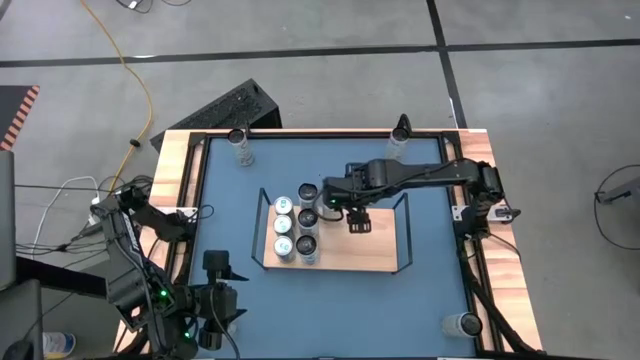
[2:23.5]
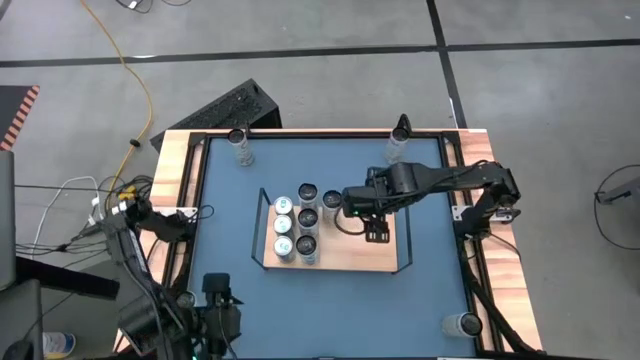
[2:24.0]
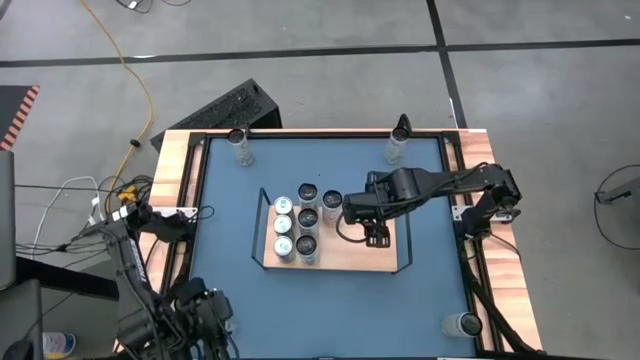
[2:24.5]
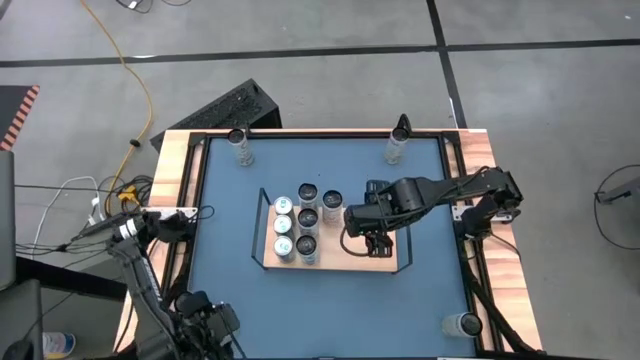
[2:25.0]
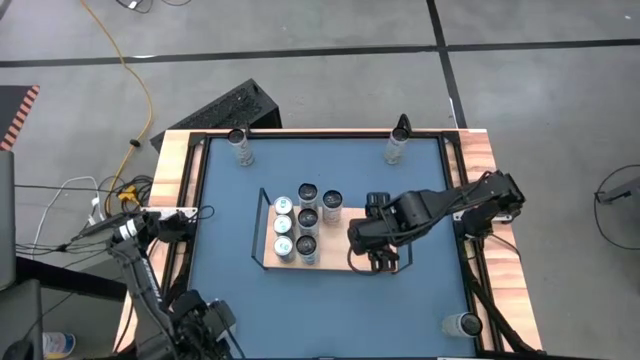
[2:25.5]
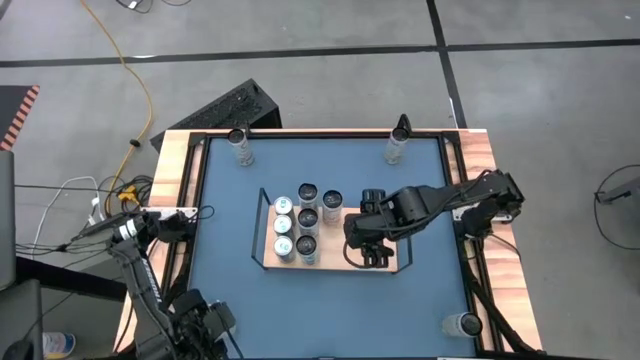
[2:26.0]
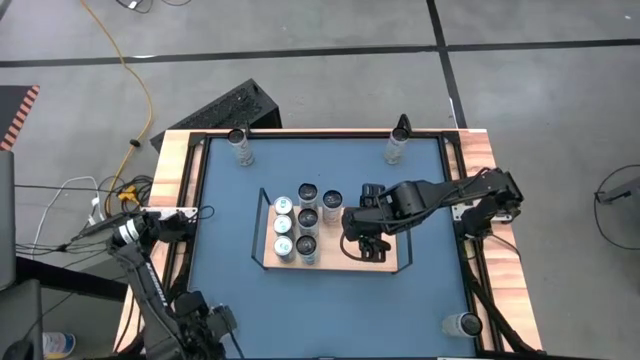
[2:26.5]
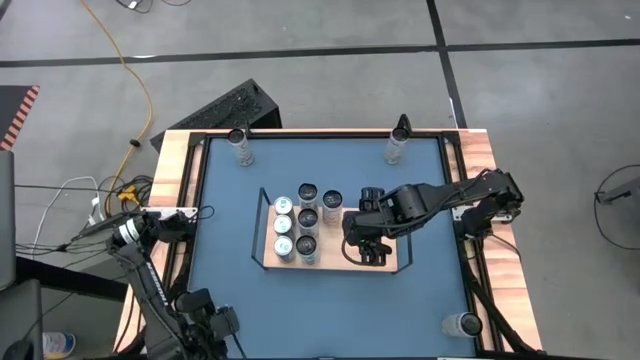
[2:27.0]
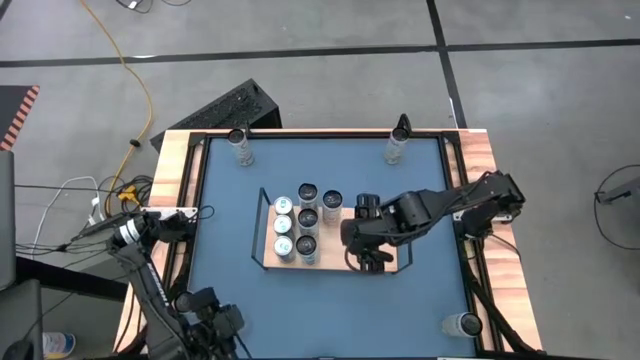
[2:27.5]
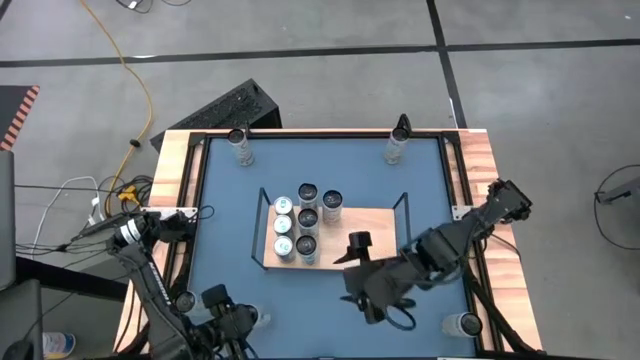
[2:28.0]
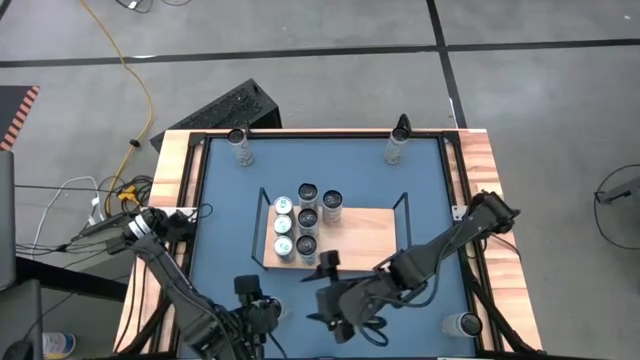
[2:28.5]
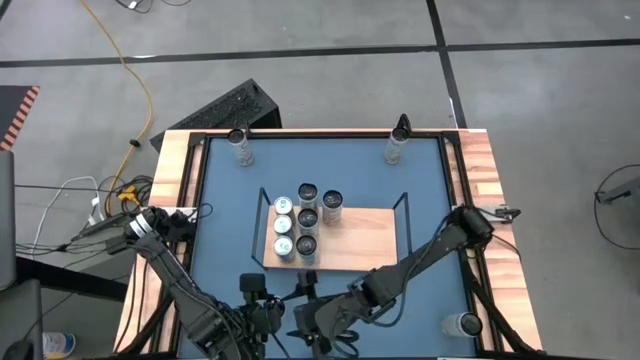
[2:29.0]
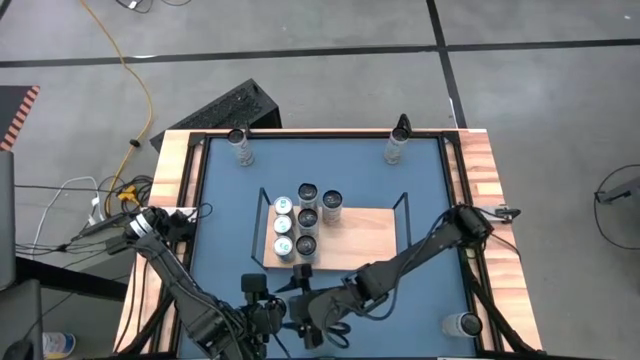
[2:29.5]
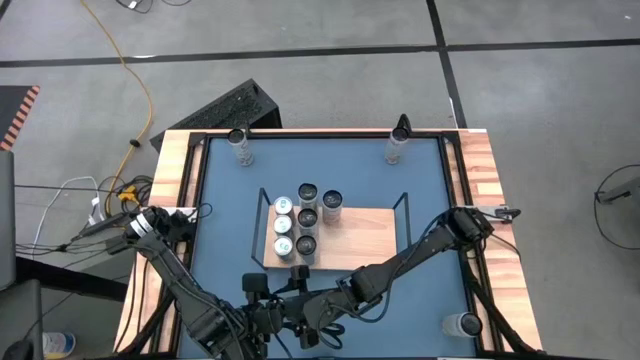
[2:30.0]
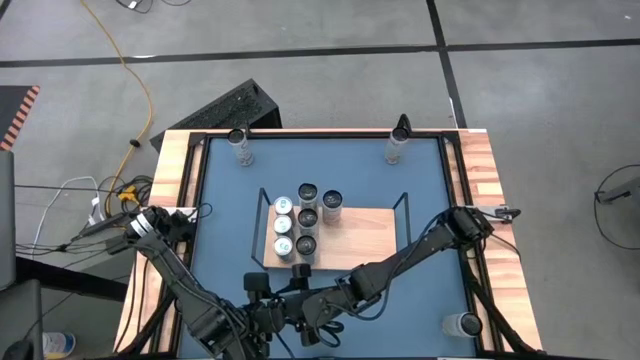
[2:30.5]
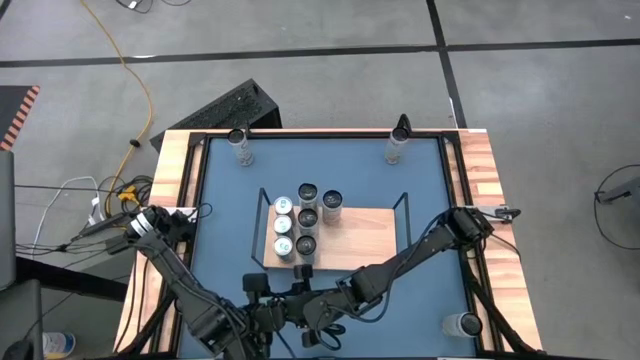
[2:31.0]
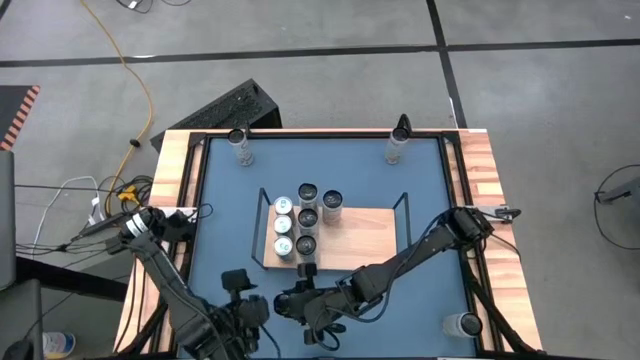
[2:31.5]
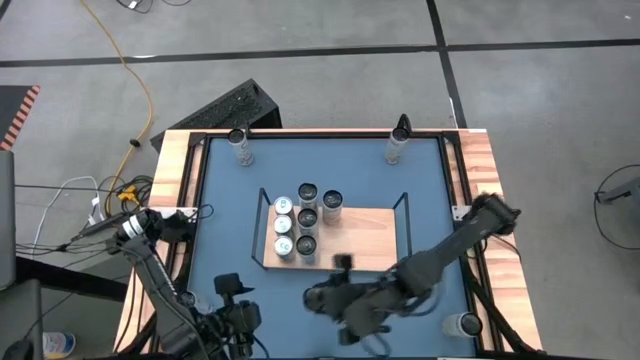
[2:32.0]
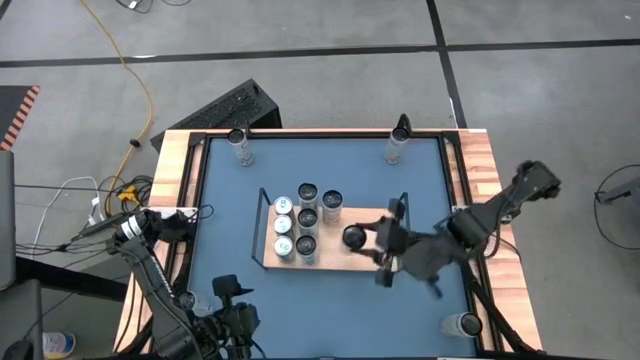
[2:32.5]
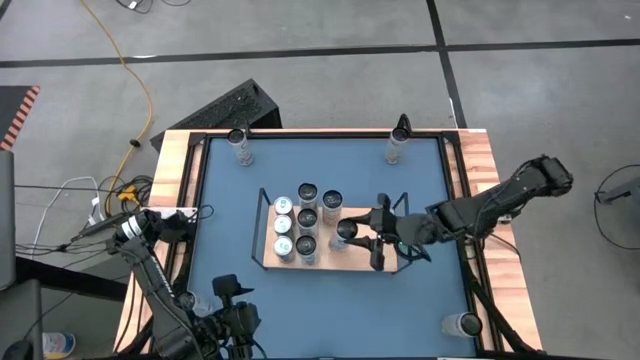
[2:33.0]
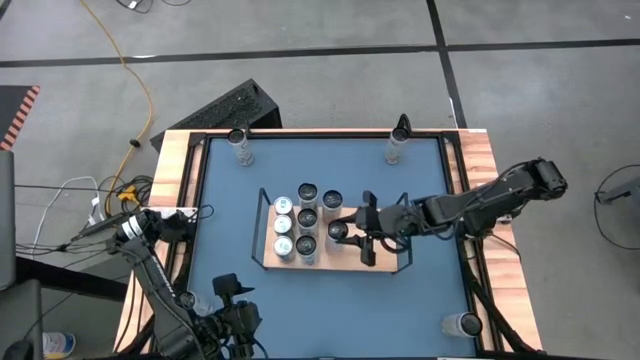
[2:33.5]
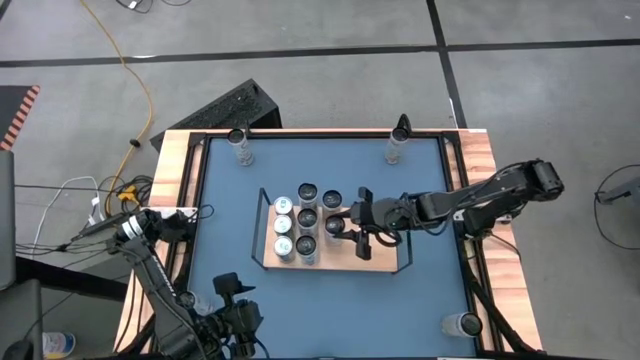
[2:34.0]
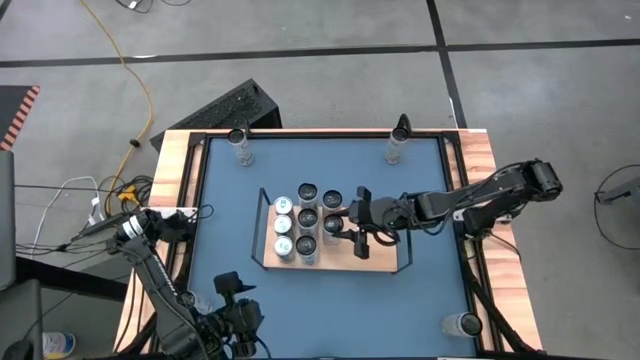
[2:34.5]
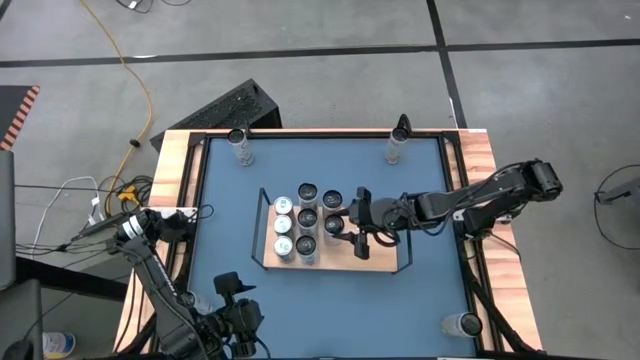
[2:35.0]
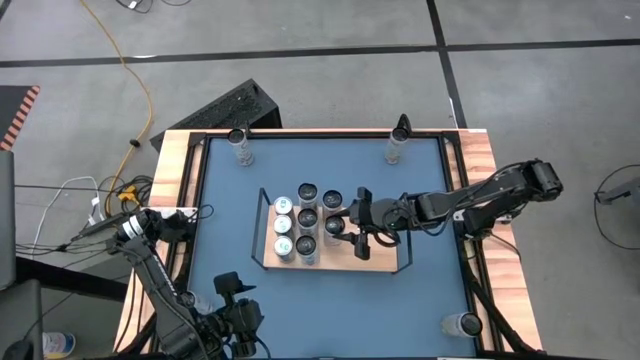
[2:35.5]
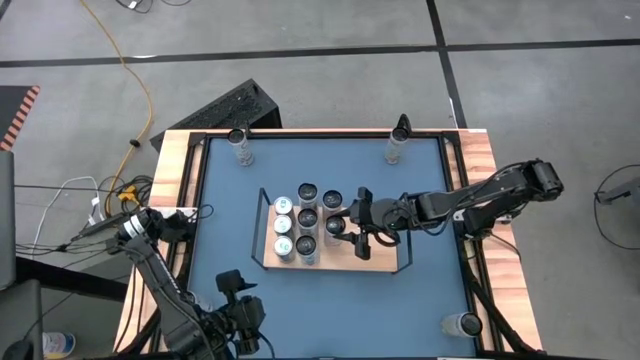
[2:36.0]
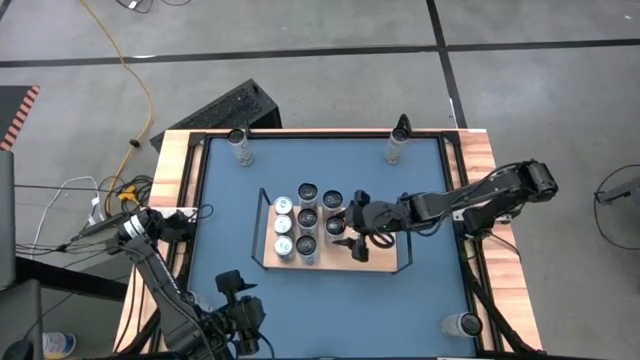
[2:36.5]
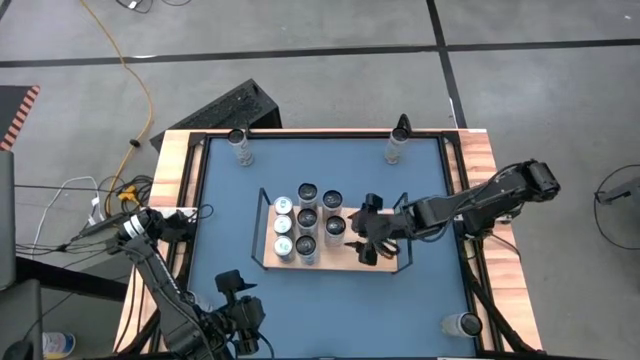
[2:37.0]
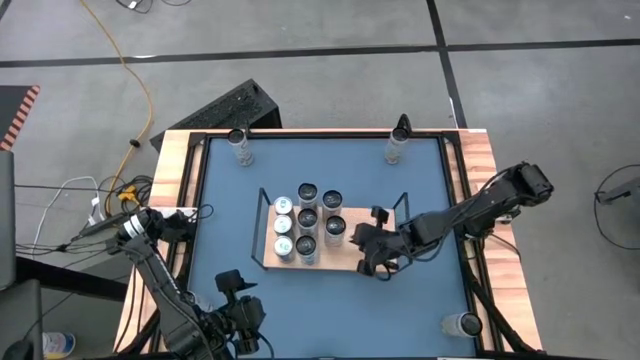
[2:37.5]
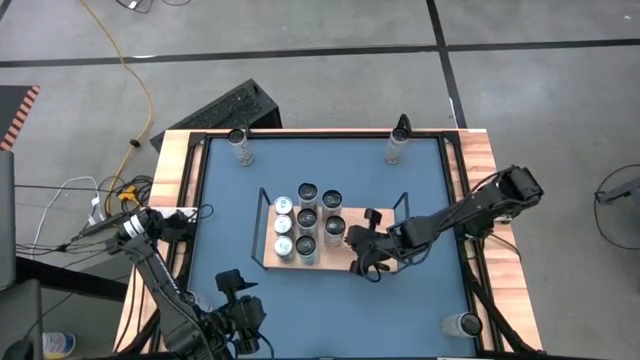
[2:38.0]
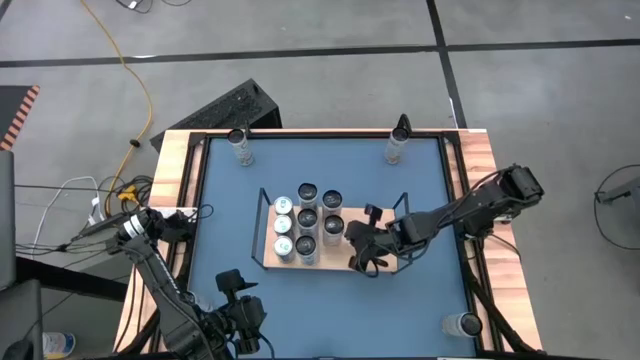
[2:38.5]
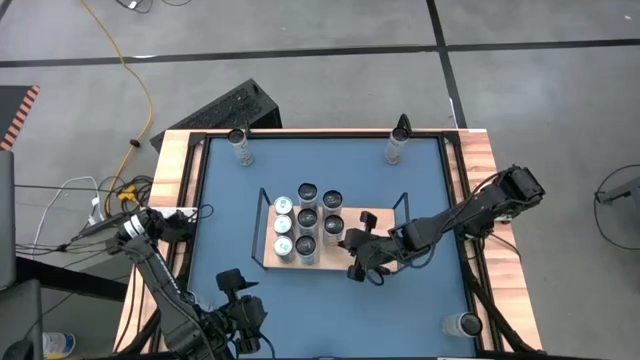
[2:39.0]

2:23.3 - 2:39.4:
Task: Place canned beverage on shelf
Put the right pink soda can on the shelf aligned with the other pink soda can

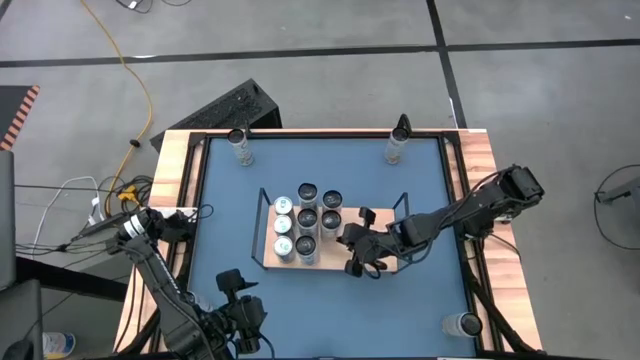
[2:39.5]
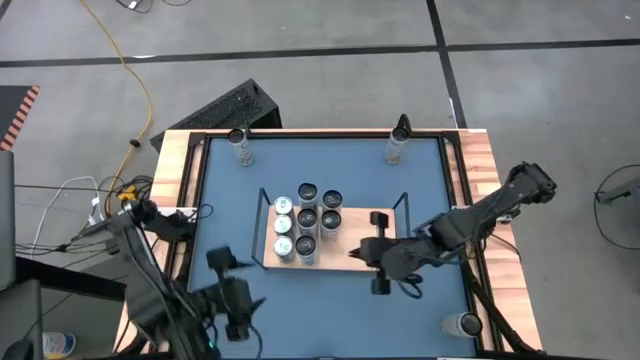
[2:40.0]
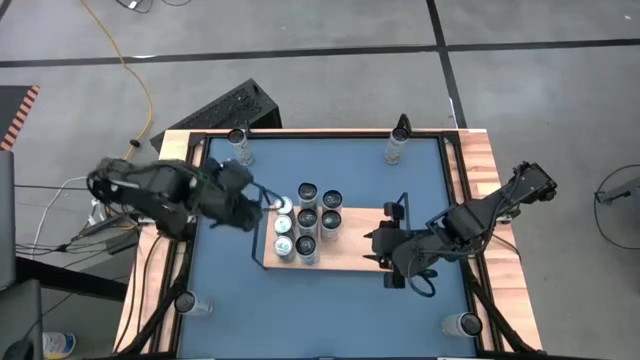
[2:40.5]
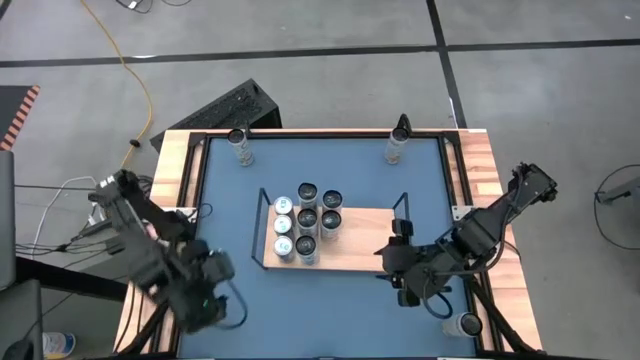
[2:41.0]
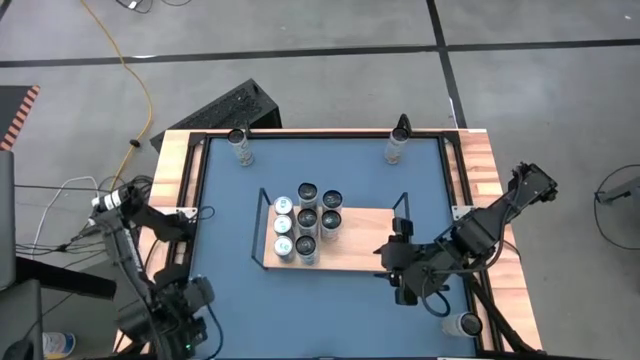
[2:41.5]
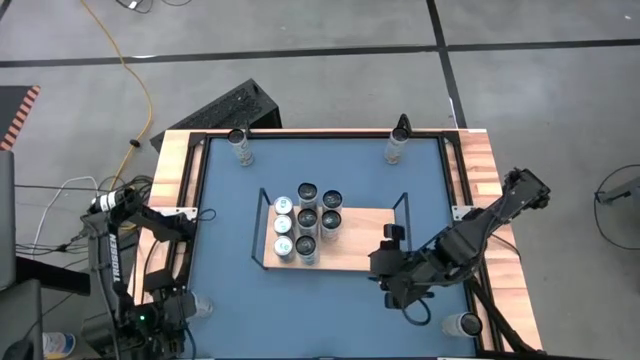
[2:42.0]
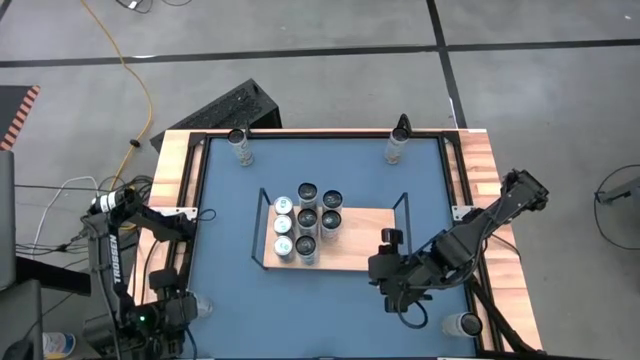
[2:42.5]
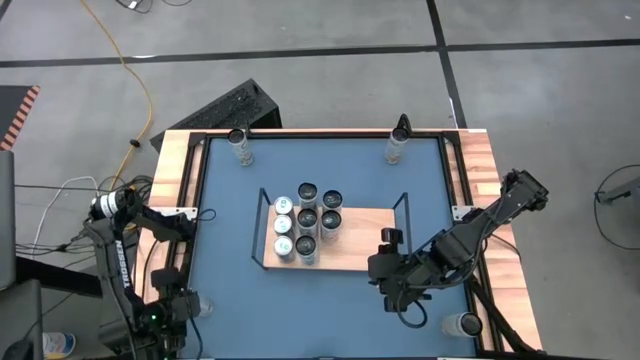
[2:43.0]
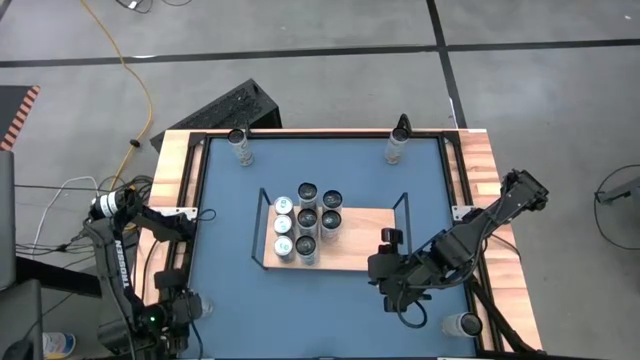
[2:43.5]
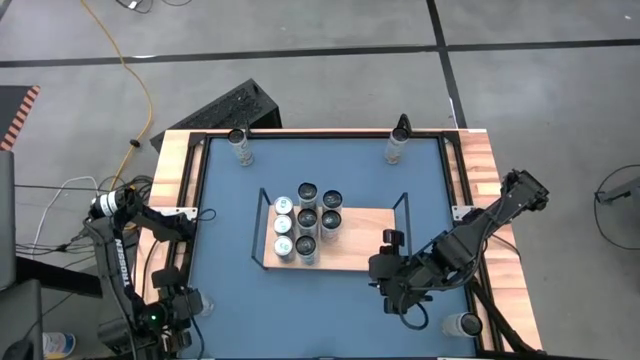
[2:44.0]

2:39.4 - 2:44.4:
Put the pink soda can on the shelf aligned with the other pink soda cans
